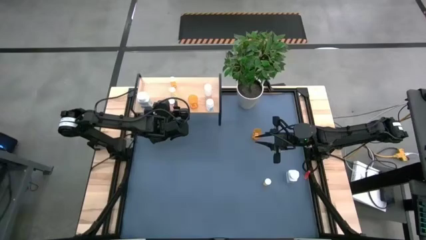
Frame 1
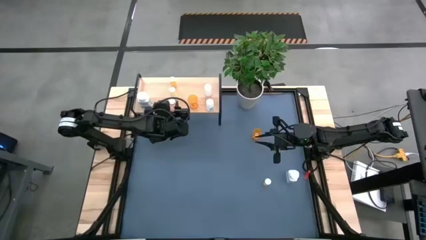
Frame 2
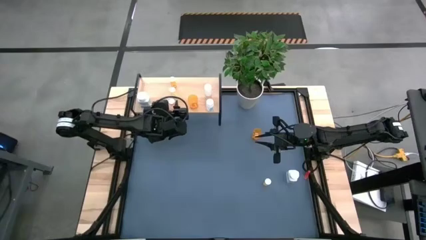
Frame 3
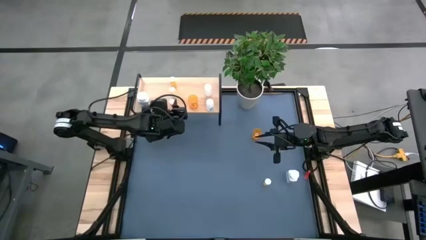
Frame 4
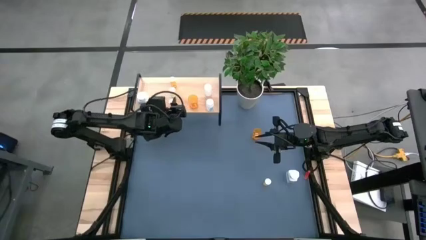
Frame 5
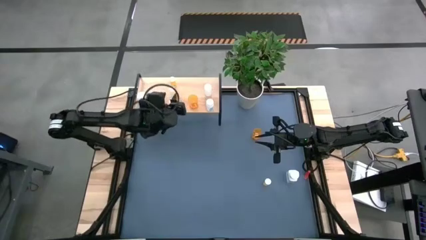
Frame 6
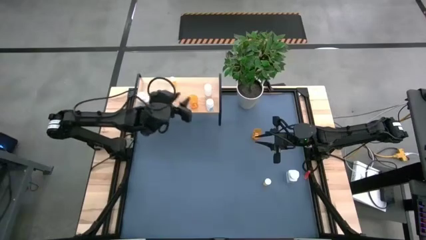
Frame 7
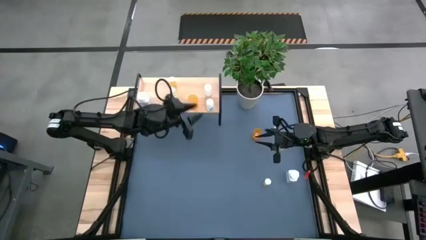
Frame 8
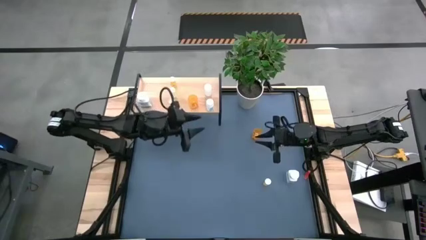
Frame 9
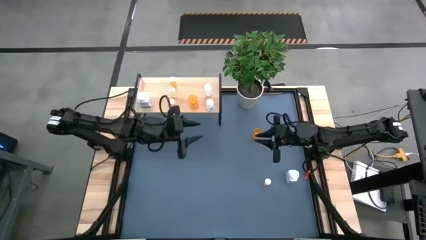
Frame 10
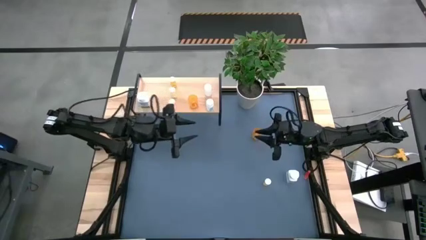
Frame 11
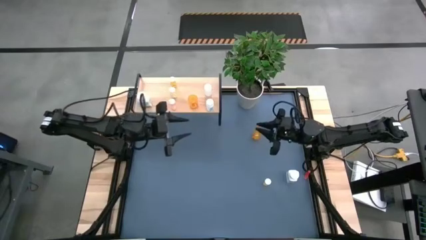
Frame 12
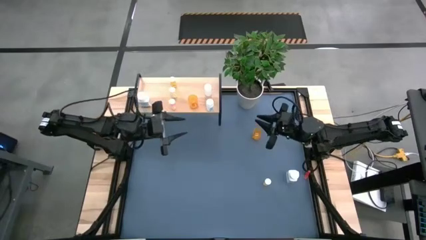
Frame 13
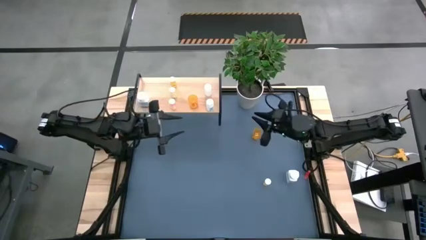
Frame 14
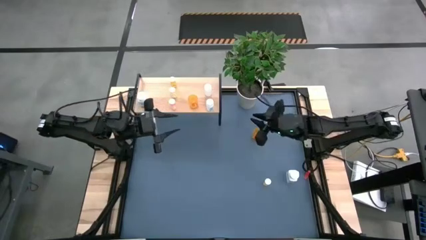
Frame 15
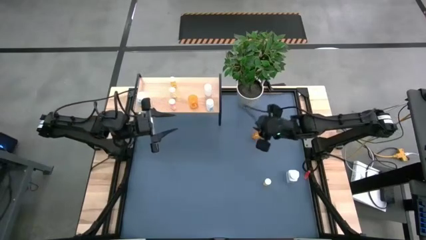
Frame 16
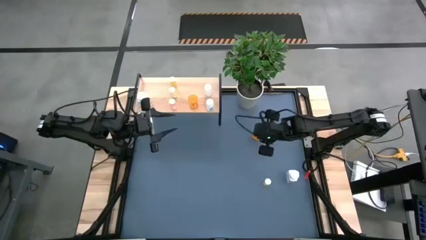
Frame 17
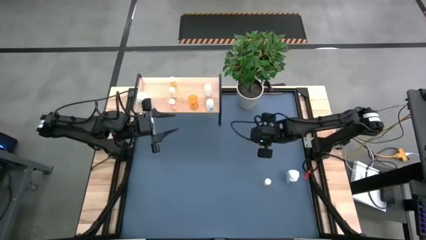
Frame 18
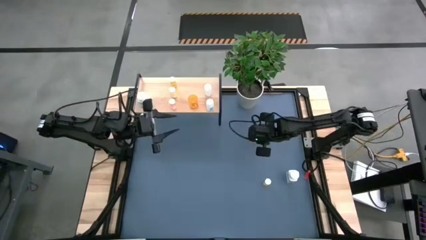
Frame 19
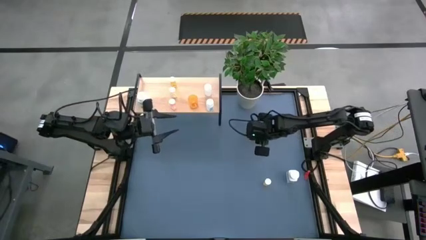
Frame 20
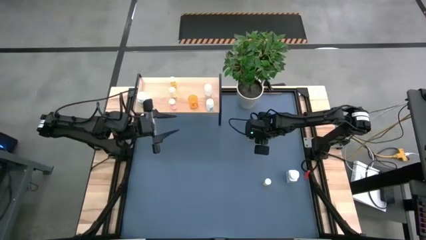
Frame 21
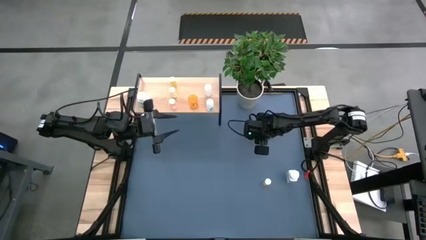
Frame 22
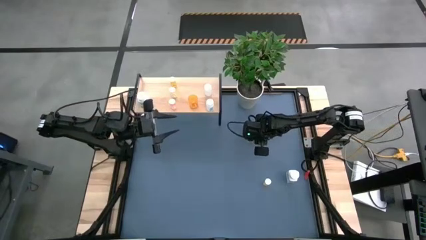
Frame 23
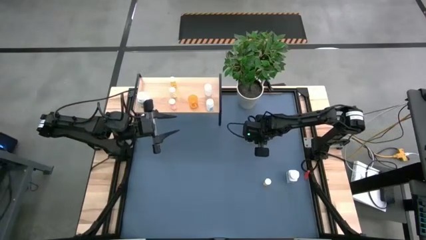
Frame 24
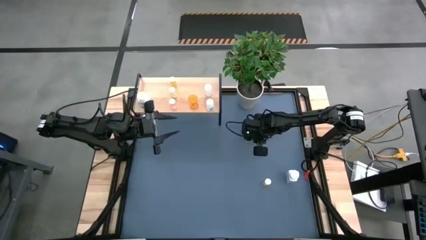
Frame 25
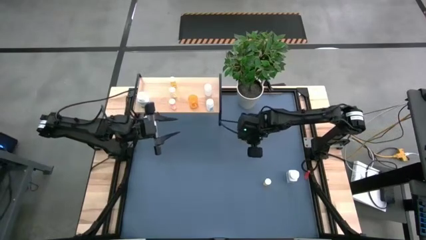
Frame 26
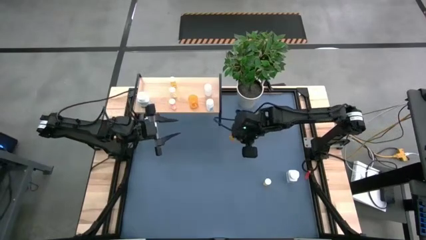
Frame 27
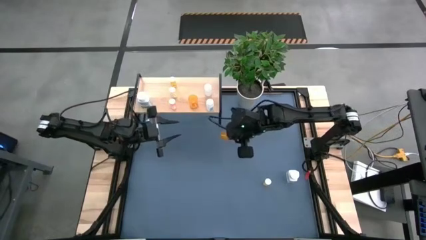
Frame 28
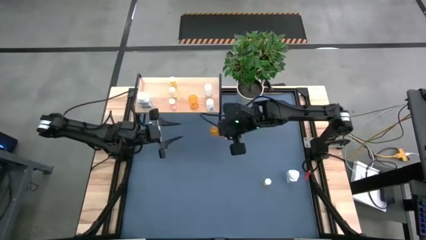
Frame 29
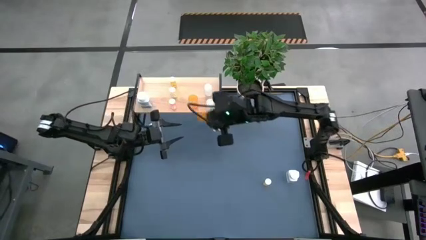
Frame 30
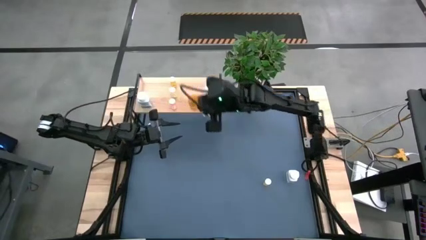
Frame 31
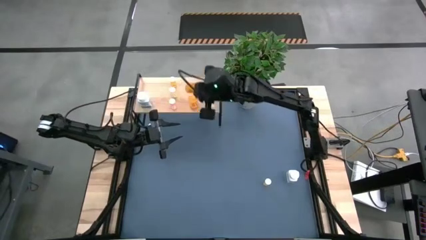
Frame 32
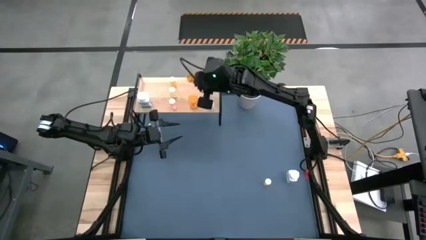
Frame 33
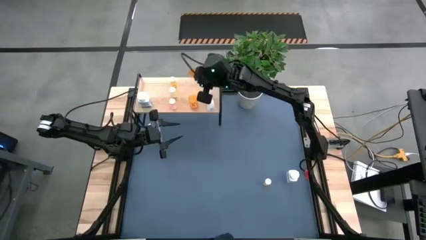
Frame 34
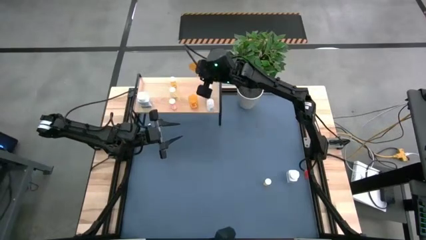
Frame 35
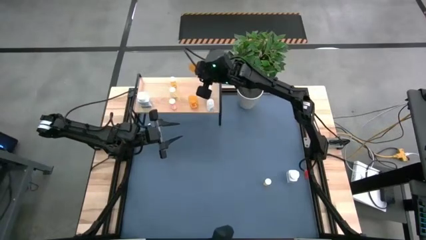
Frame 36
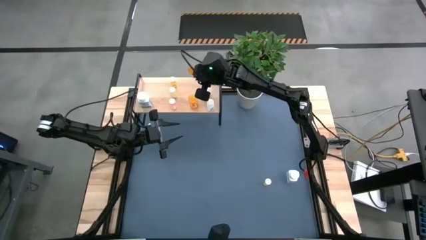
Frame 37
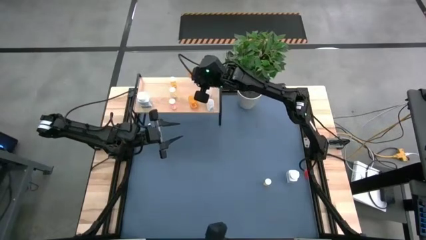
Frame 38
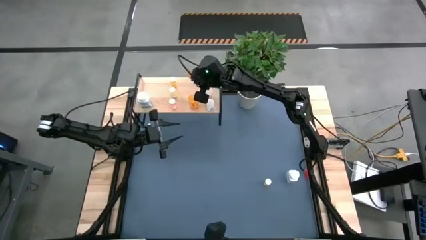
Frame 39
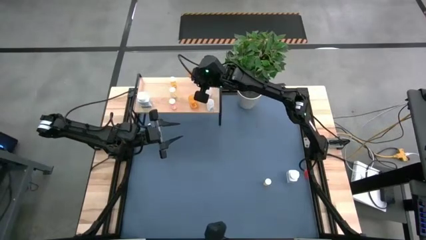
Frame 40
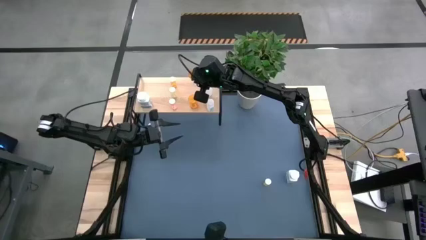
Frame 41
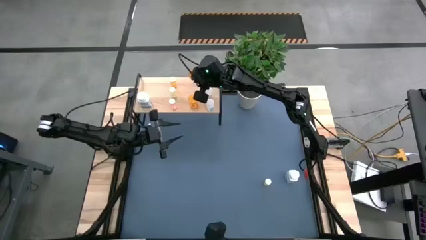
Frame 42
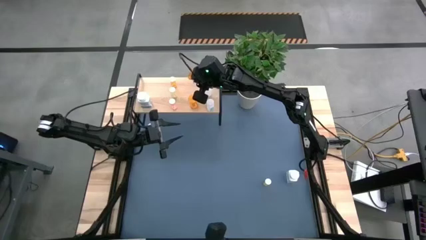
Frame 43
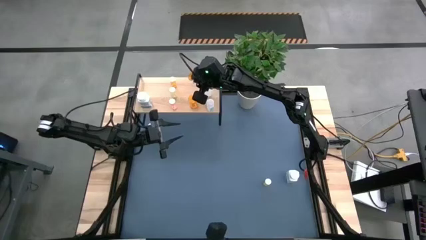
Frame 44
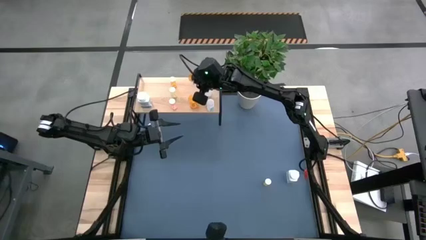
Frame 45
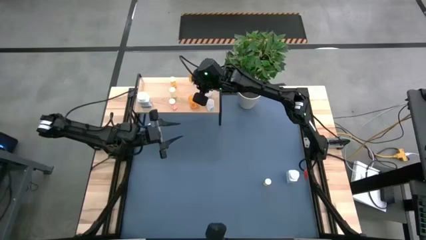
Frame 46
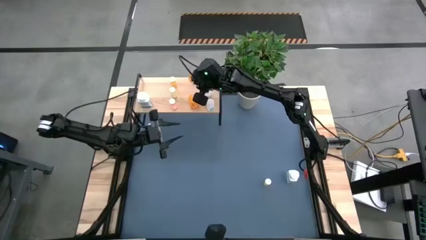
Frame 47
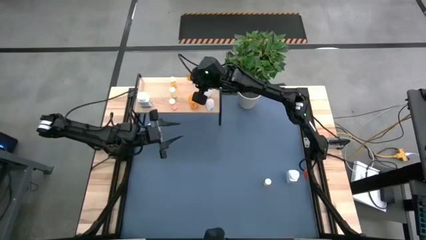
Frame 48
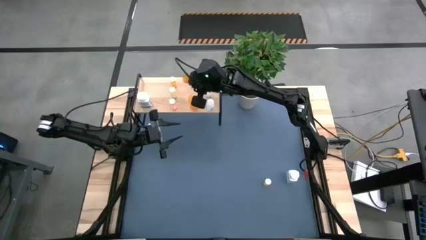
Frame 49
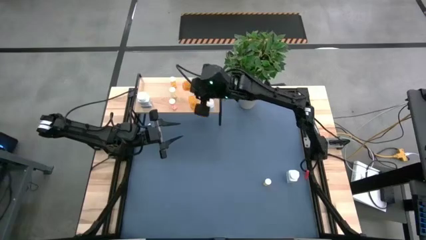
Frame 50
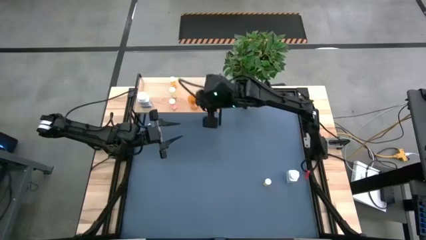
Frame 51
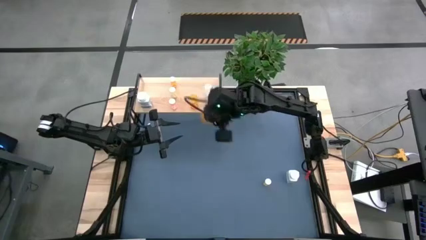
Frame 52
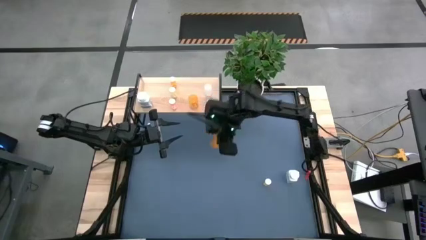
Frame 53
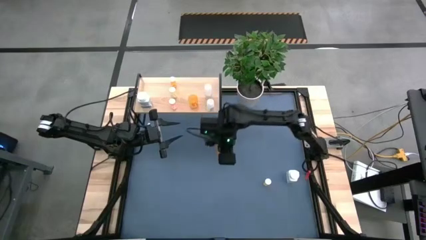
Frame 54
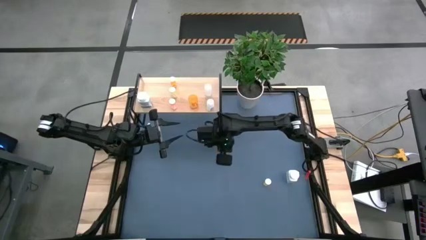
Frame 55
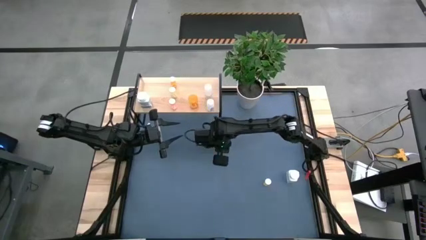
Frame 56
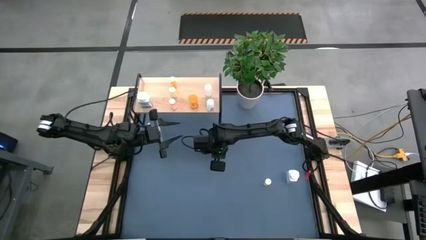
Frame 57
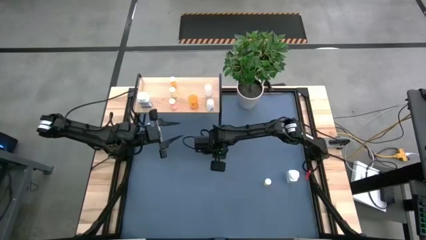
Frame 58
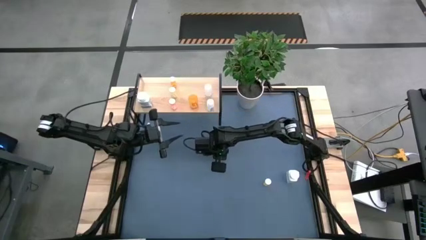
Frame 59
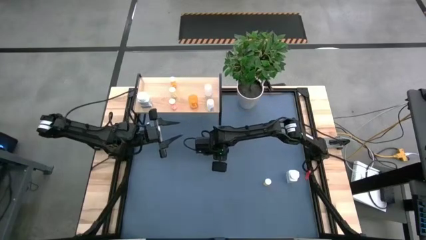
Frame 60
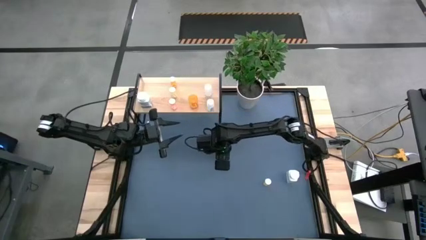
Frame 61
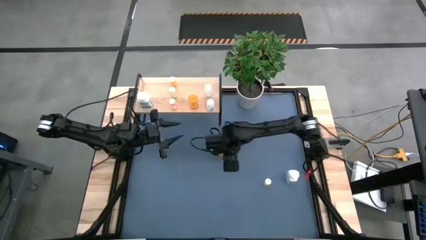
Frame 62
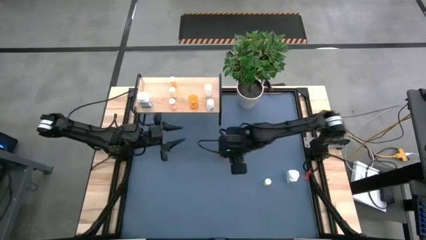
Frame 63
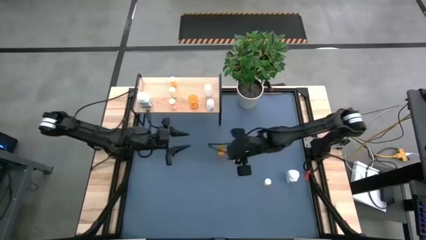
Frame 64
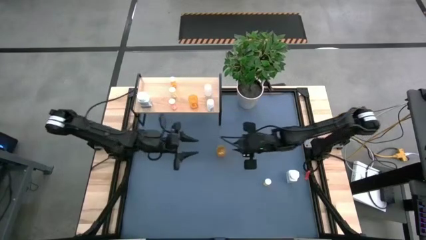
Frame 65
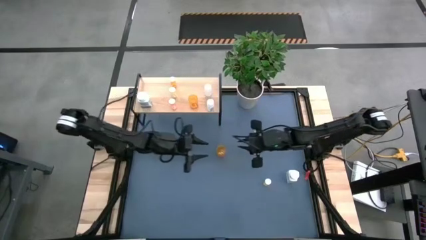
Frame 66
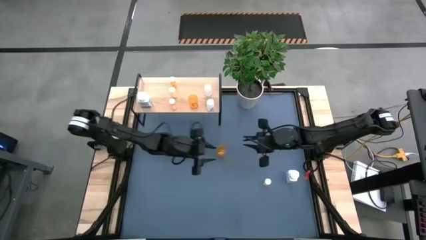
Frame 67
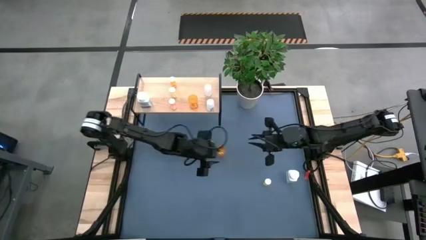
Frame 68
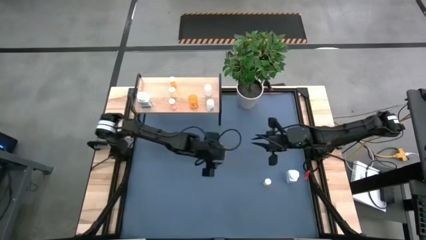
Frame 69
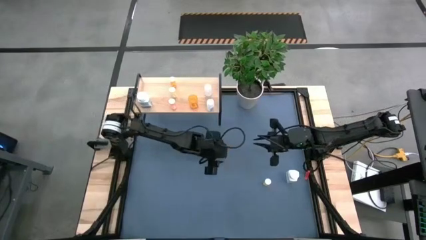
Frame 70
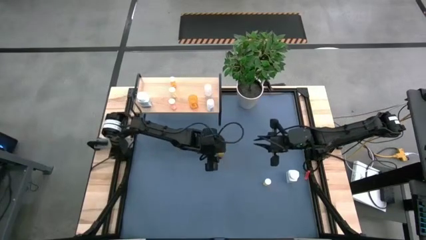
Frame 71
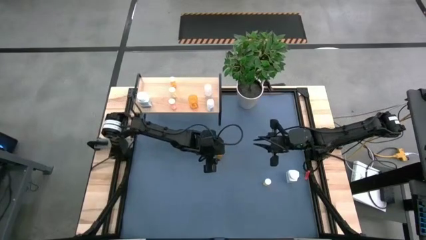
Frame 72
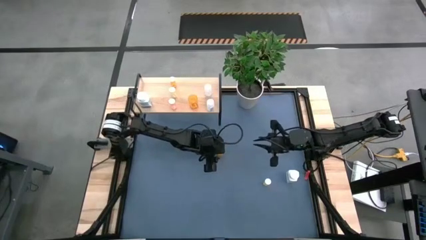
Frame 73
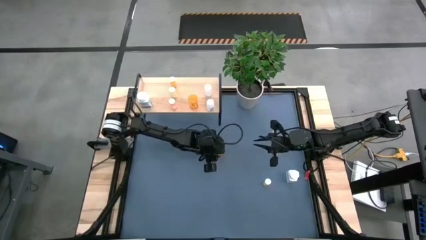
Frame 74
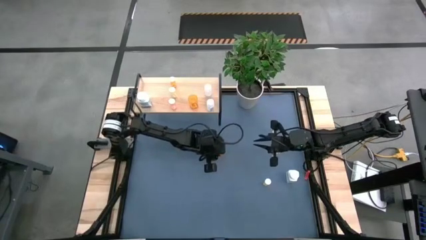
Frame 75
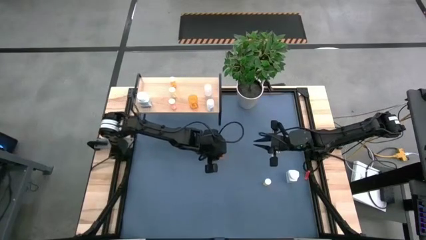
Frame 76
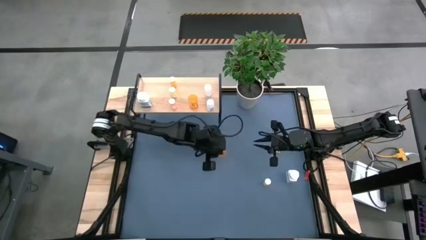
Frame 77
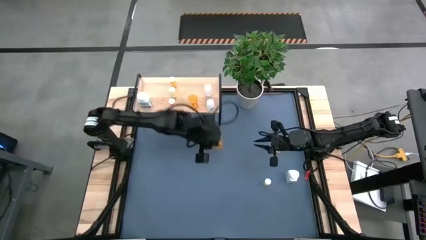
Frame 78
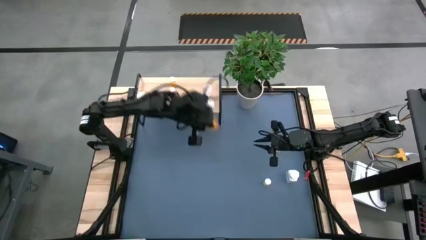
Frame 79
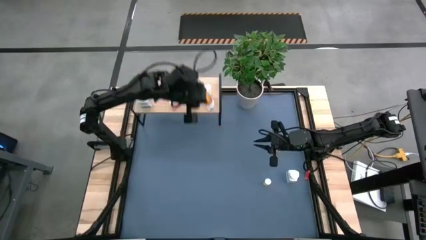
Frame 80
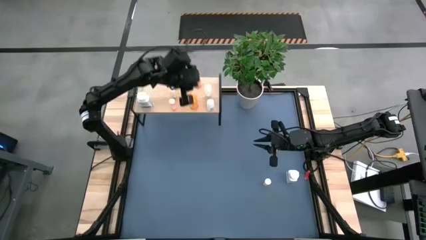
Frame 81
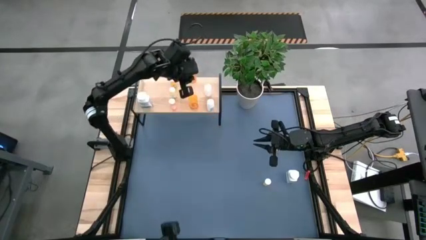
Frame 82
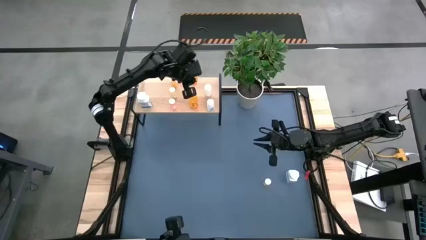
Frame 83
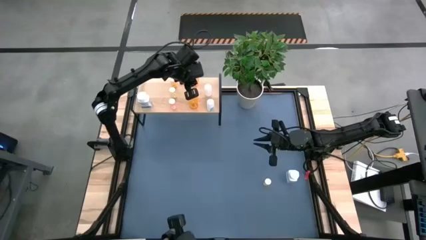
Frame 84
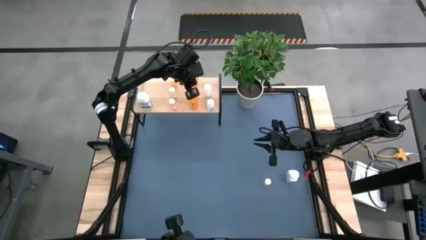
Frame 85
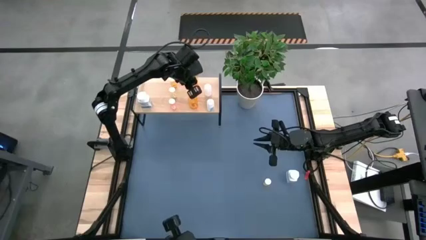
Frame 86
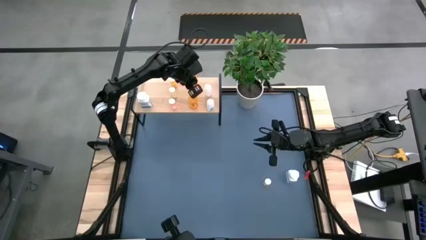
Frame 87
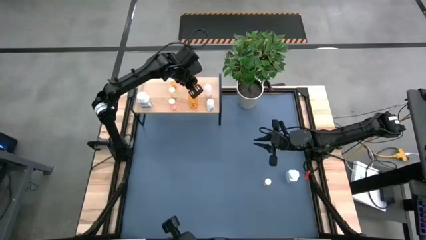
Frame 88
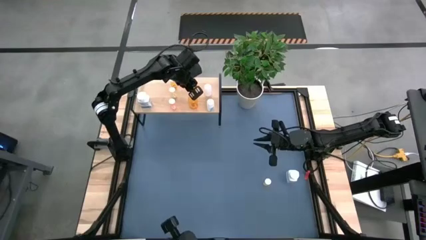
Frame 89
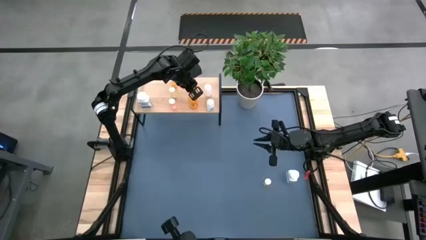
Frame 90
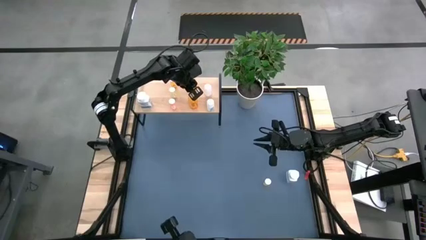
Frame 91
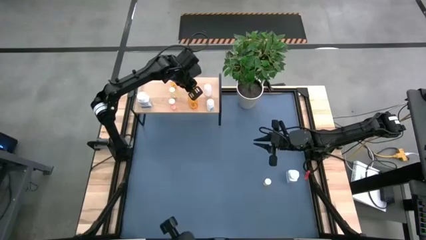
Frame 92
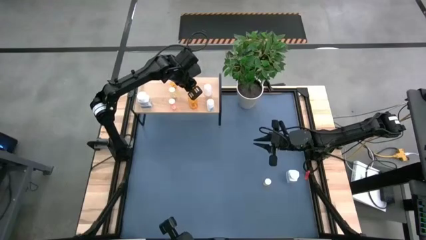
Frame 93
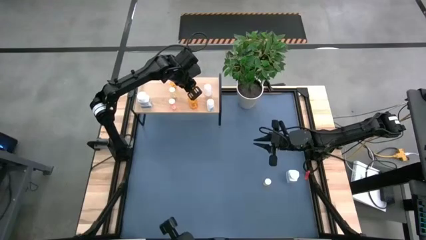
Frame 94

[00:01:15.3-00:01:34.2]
Task: Pick and place medicine bottles onto shelf by color
Put the orange pill bottle on the shelf
